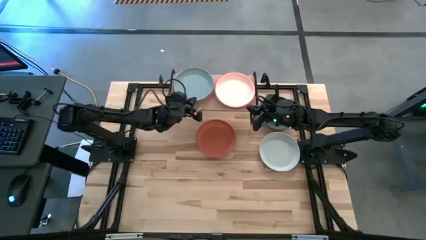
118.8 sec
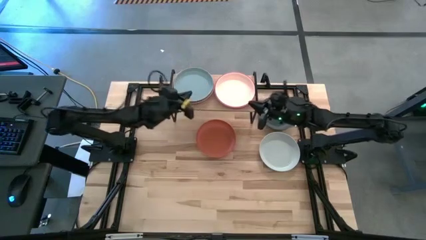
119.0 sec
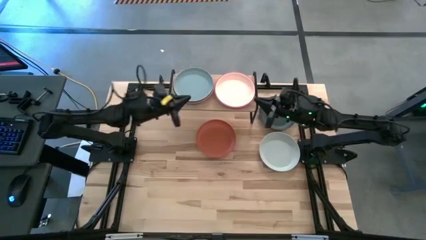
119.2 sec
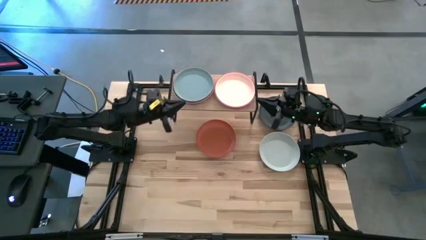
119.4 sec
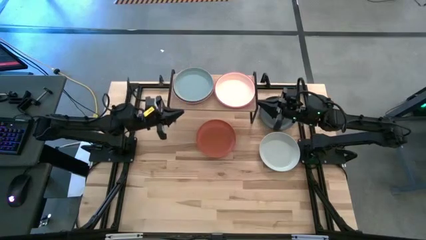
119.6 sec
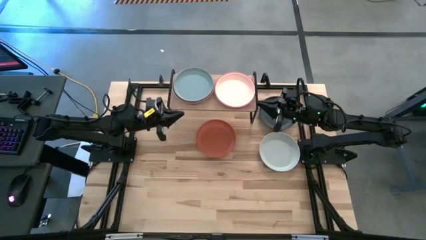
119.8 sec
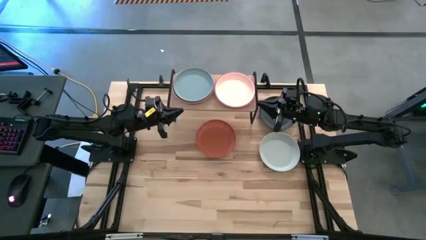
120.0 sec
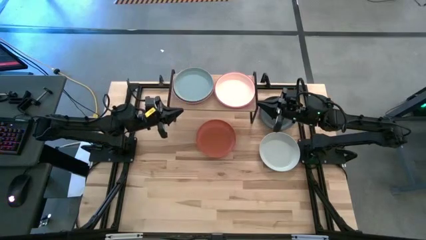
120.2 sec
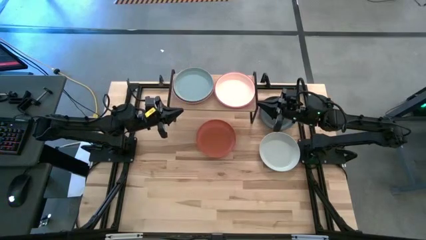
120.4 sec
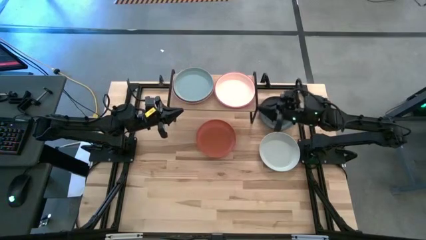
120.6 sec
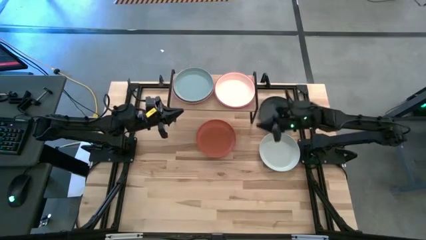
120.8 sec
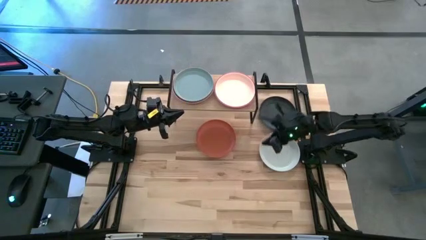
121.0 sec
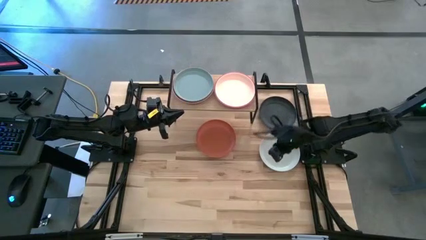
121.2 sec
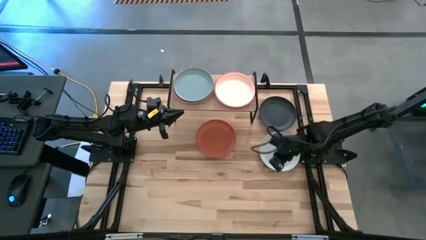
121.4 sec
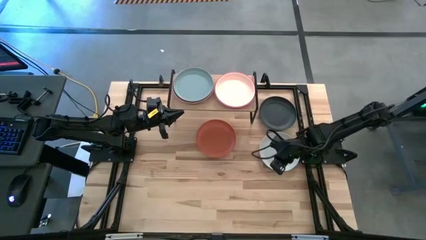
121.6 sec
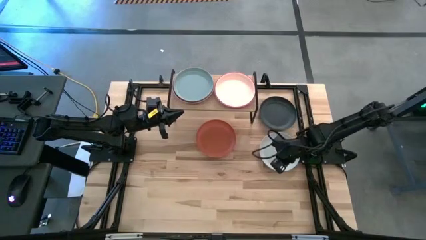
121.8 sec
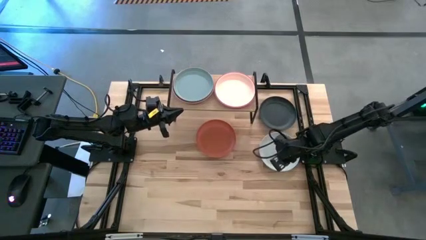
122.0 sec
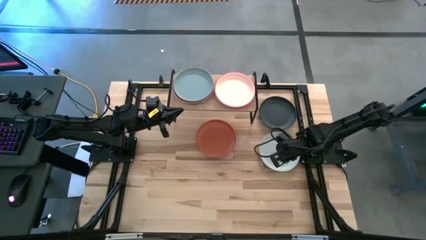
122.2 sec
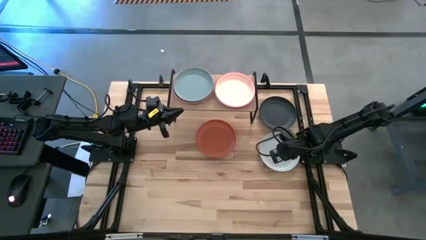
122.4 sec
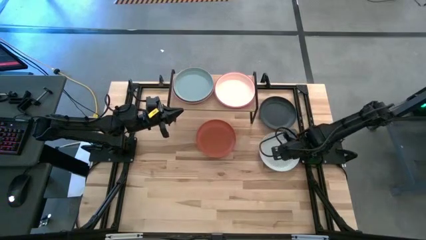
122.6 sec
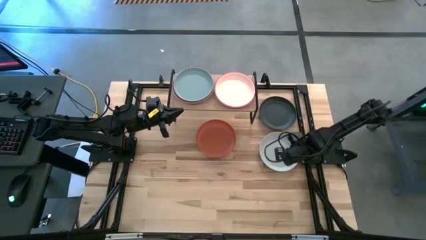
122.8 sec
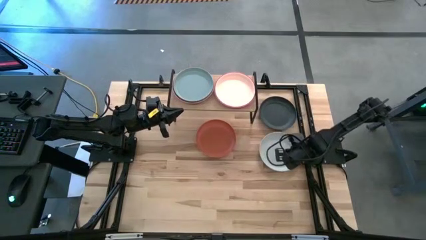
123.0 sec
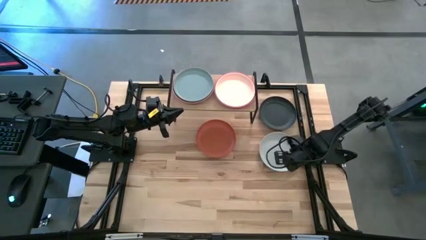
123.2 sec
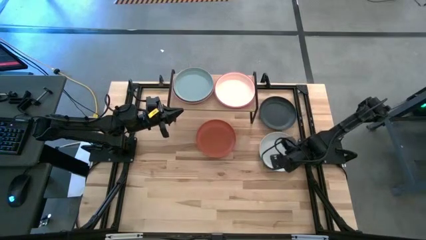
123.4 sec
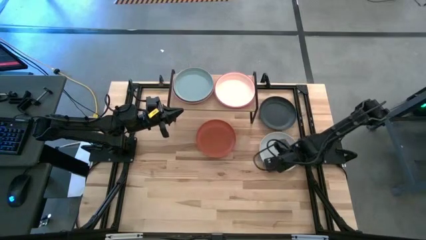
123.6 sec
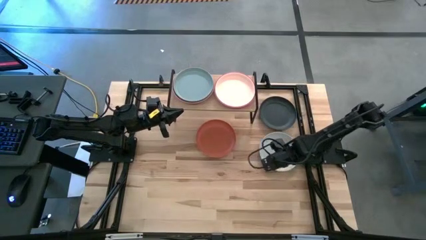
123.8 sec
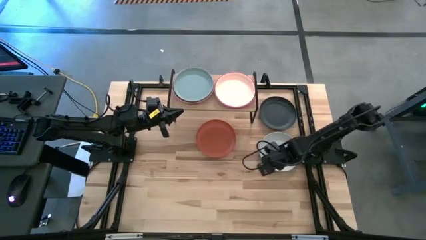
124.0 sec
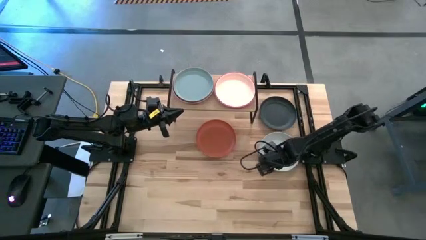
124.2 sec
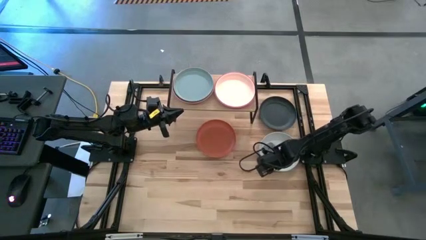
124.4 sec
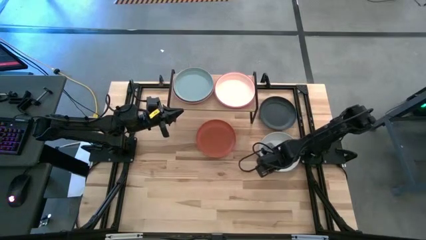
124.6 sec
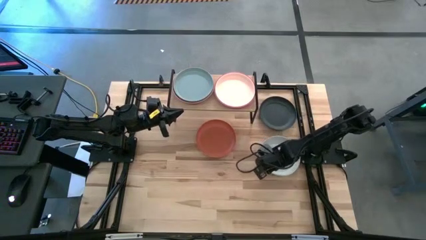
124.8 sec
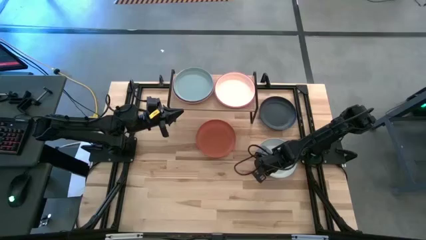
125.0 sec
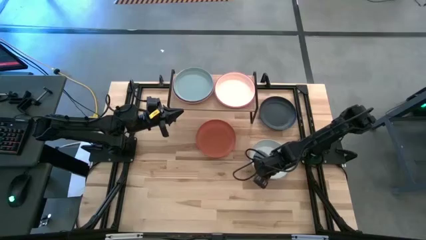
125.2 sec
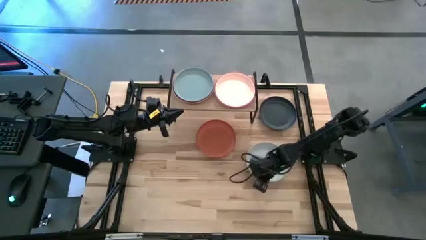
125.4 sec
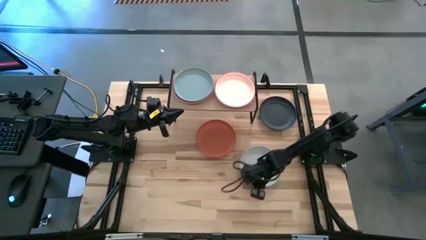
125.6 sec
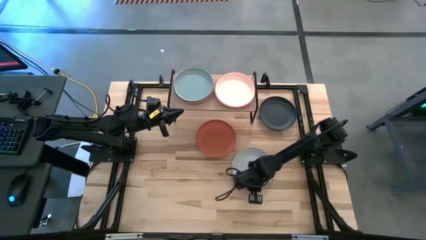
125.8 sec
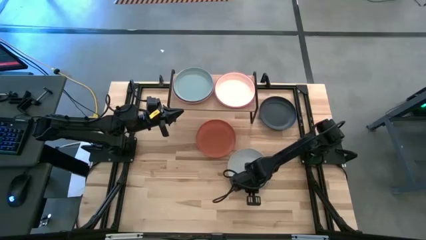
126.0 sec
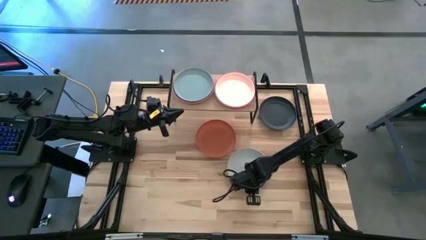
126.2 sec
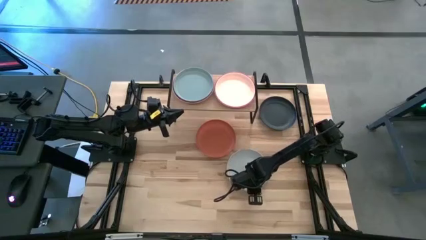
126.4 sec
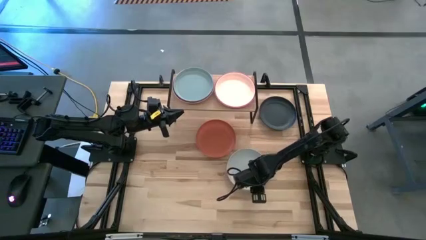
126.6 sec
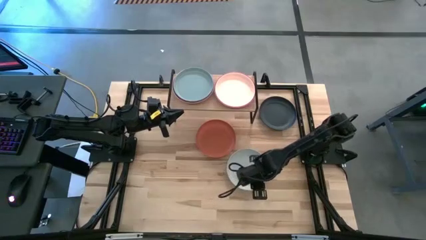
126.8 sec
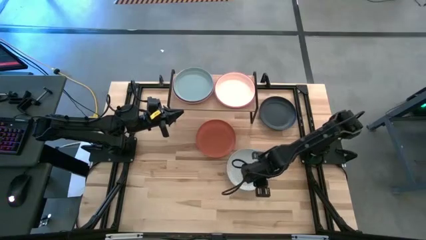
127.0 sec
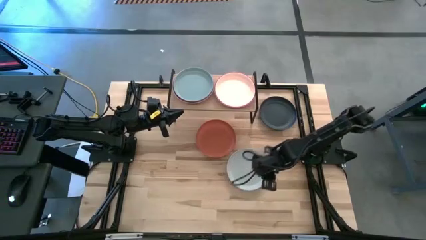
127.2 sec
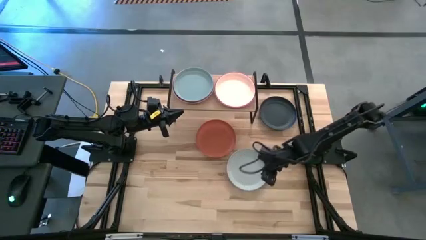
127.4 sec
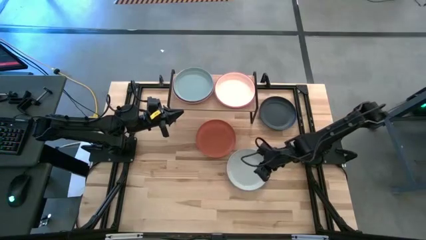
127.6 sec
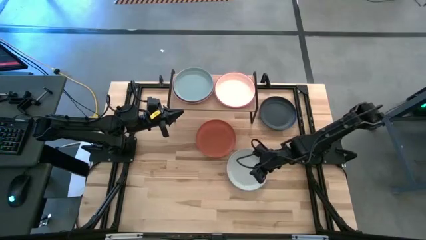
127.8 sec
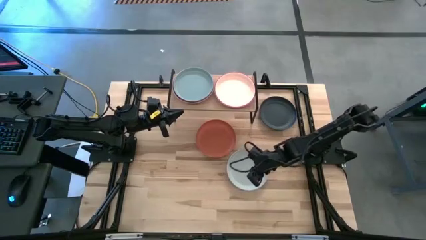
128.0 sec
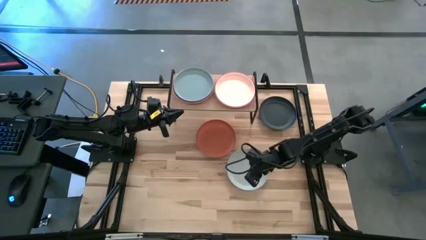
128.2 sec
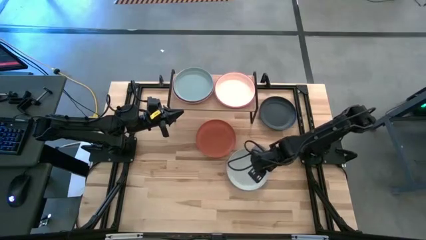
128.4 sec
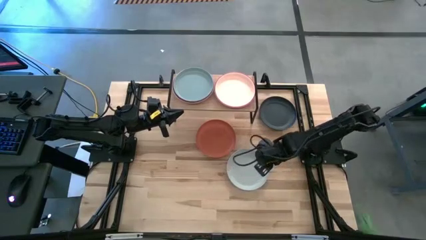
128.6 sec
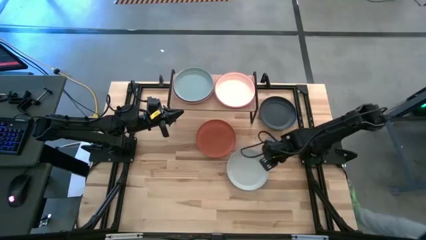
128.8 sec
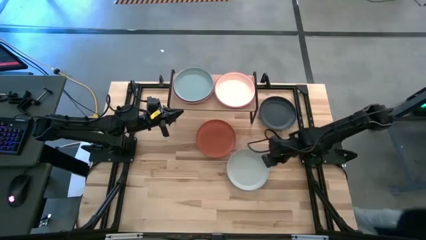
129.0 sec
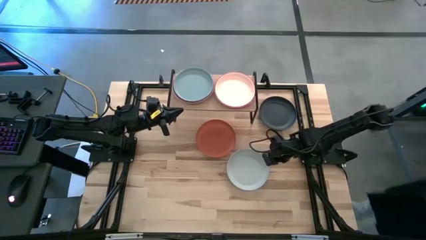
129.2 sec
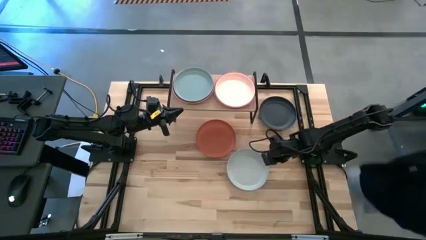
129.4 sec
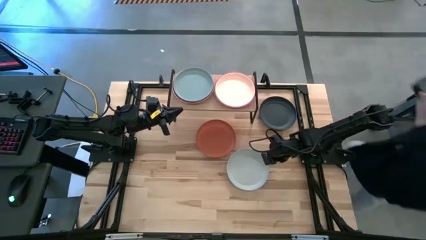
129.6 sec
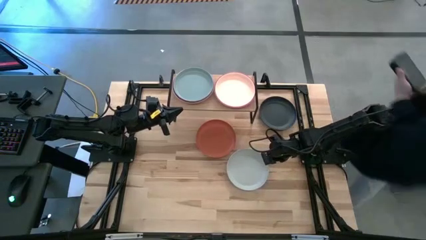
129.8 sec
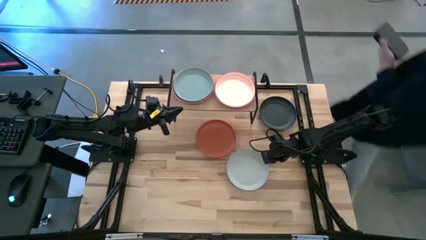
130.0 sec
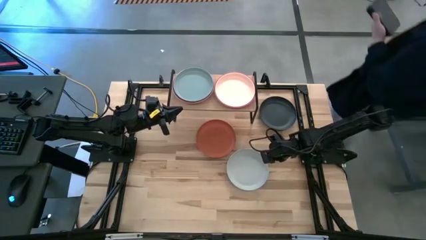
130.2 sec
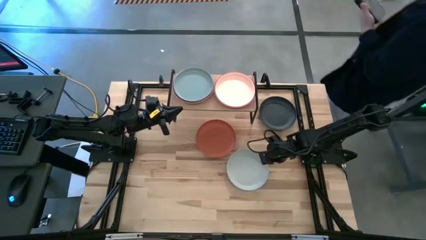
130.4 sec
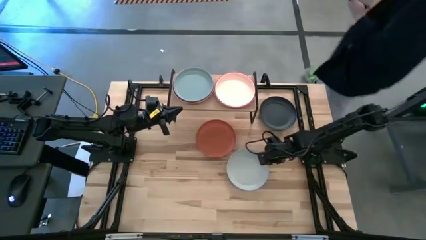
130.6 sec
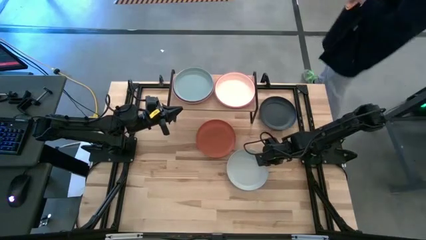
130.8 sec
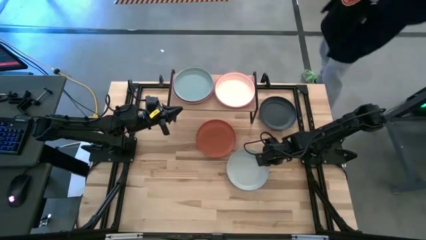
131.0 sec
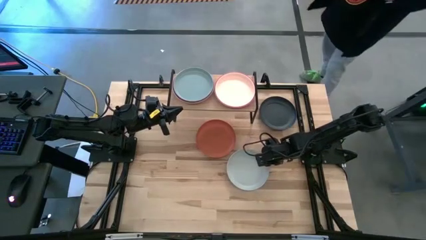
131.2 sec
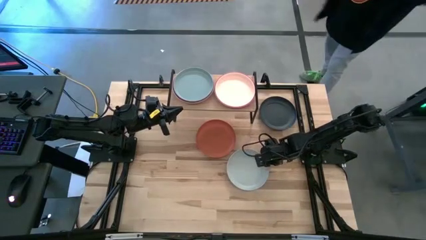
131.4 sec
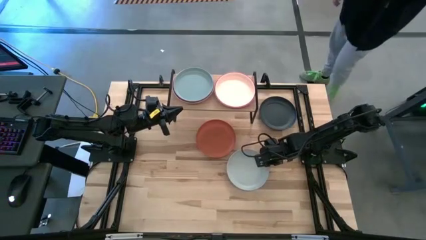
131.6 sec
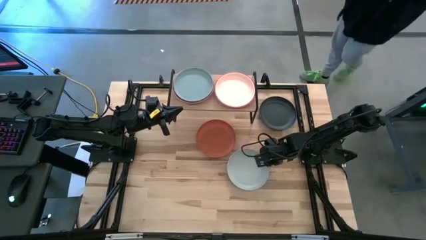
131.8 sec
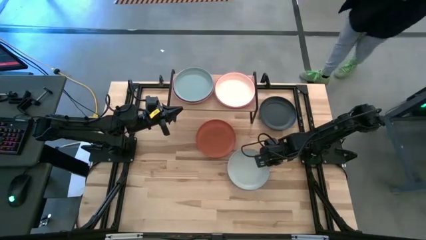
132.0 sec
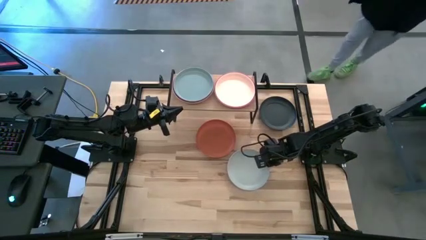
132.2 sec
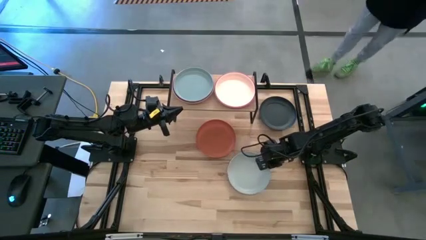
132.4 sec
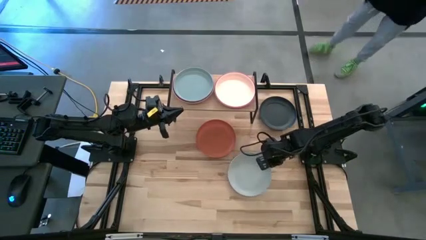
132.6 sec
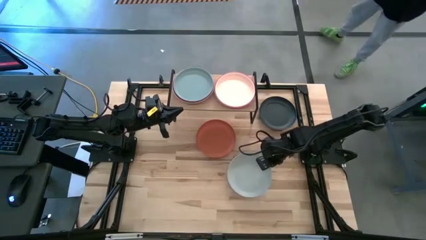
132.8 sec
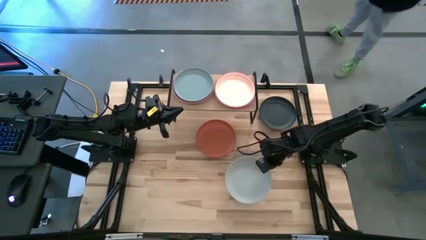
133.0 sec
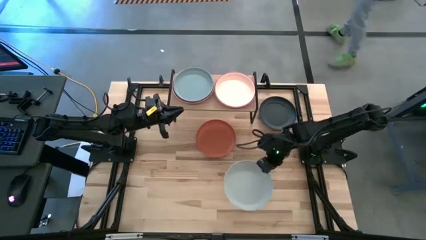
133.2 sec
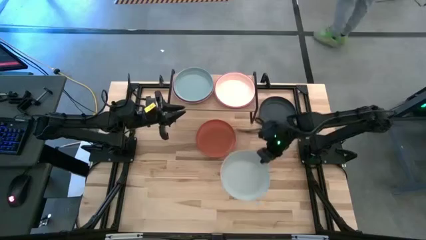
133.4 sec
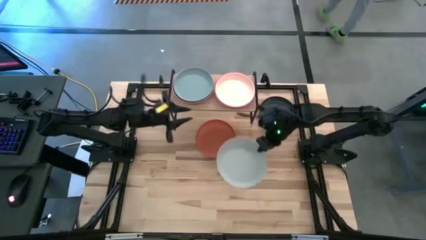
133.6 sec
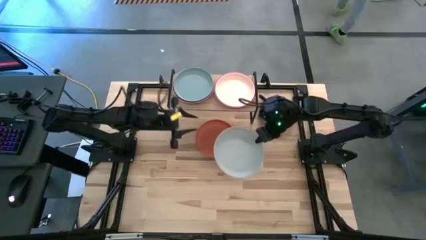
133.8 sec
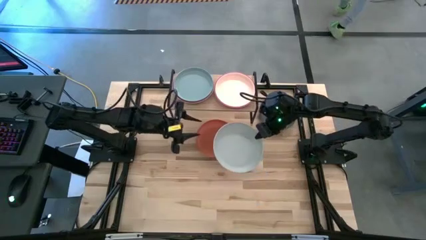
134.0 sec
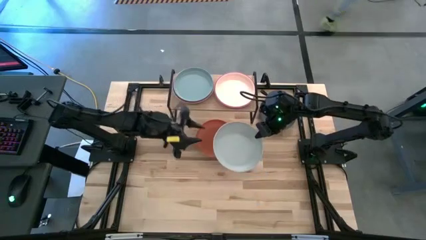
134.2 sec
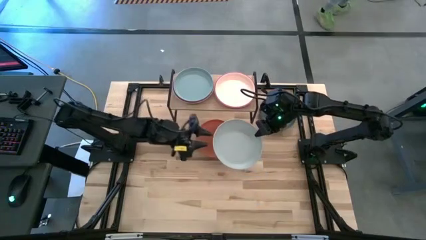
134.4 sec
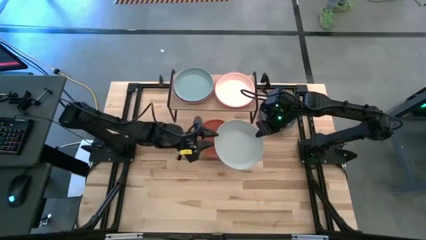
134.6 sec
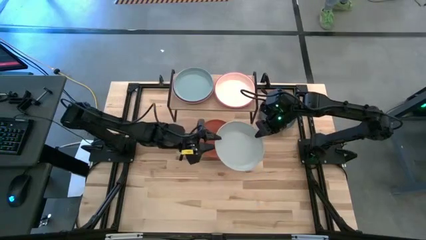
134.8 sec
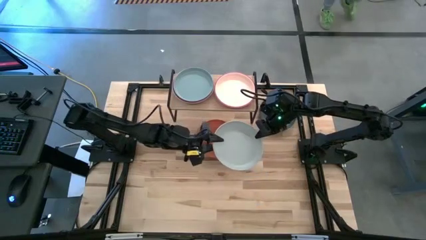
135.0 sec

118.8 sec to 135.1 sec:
Task: Place and stack plates onto a shelf
Stack the white plate on top of the light blue plate

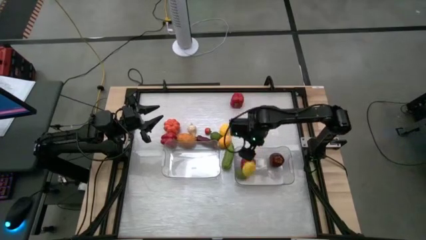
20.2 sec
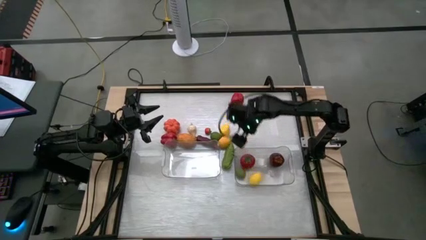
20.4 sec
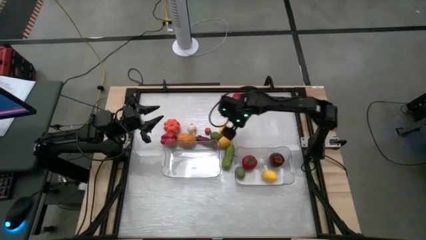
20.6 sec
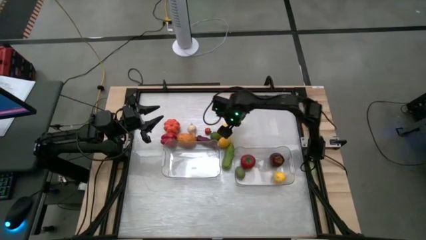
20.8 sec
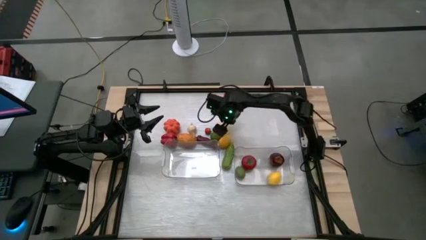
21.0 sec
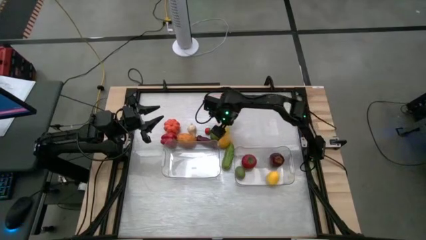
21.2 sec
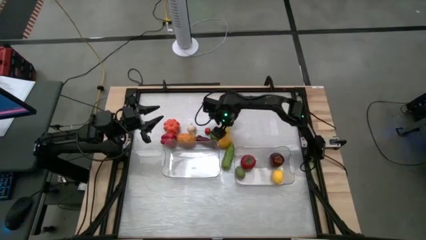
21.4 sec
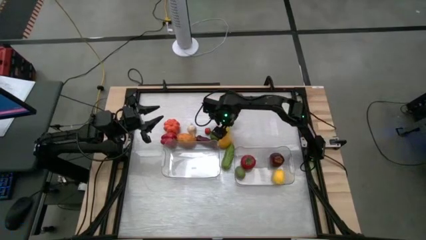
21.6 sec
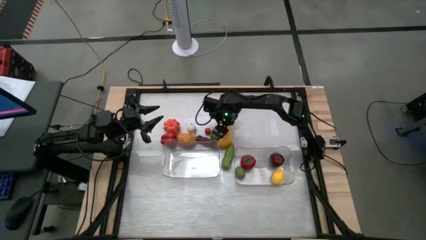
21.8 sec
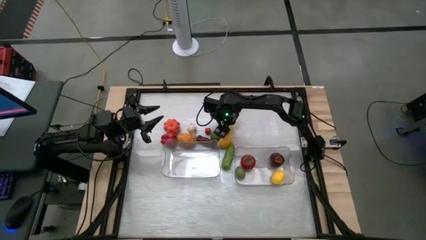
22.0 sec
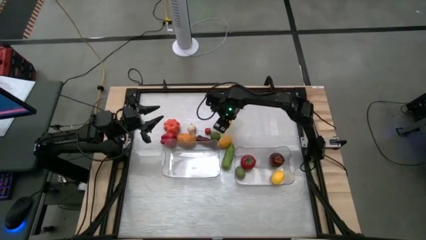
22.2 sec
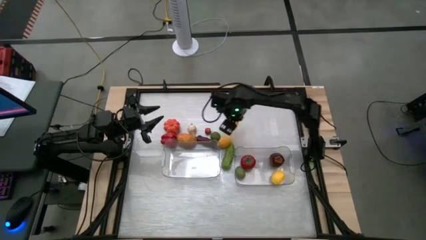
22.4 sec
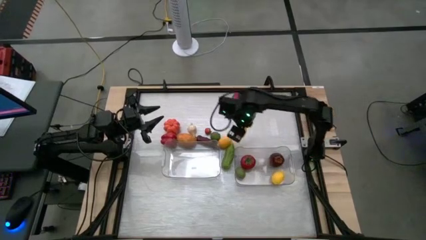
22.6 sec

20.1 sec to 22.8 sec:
Task: Sort produce into baskets
Put the top lemon into the right transparent bin
